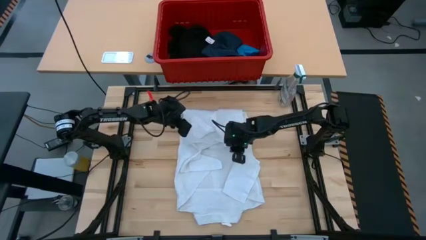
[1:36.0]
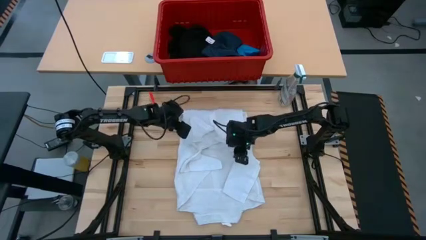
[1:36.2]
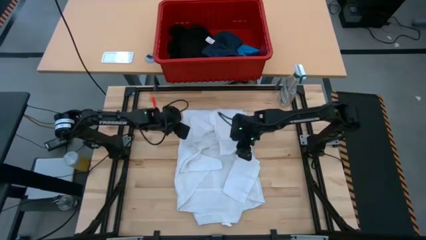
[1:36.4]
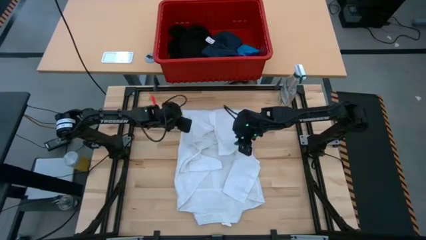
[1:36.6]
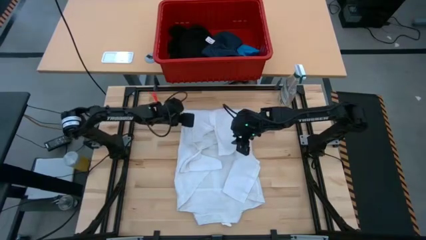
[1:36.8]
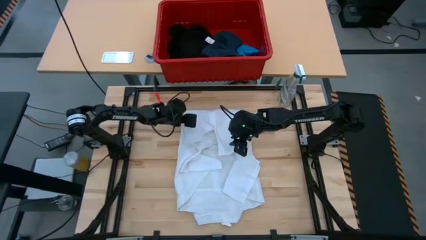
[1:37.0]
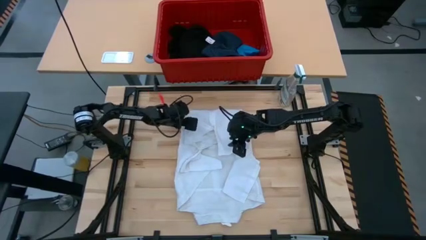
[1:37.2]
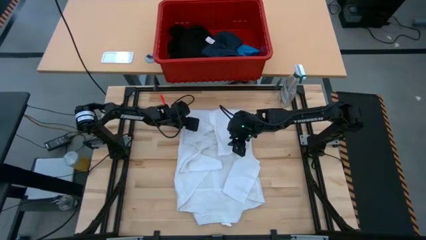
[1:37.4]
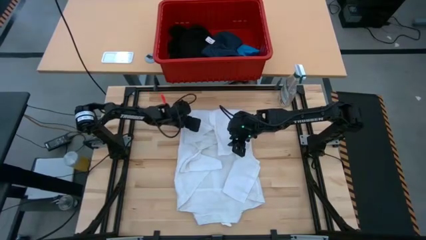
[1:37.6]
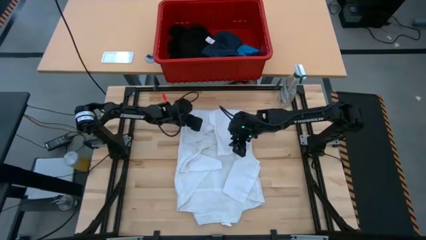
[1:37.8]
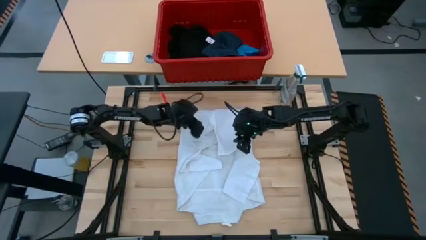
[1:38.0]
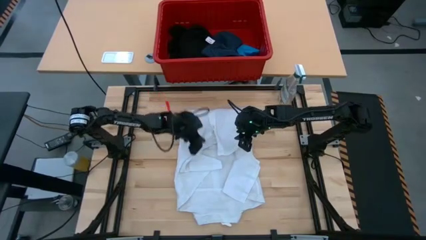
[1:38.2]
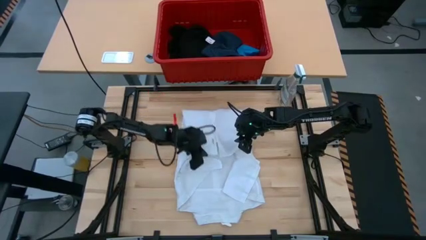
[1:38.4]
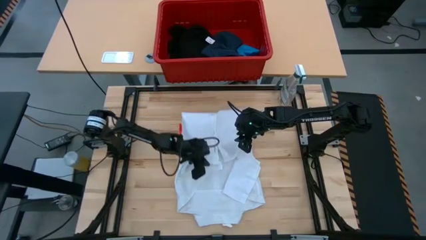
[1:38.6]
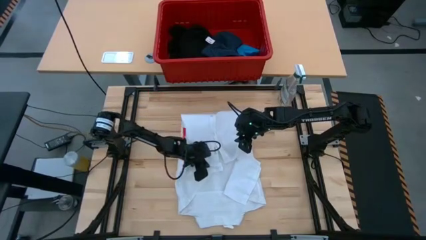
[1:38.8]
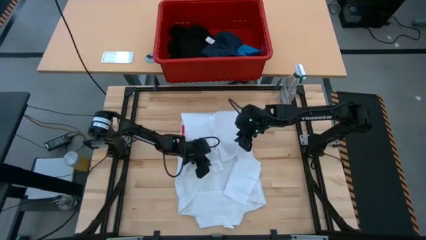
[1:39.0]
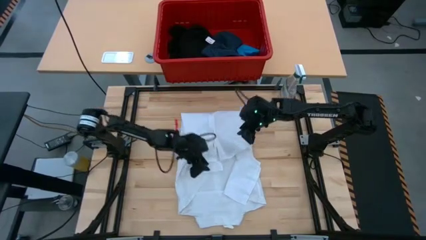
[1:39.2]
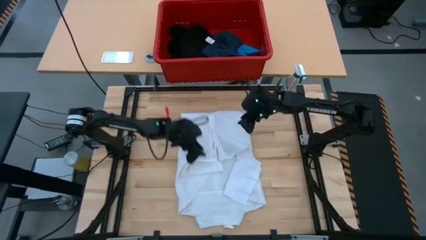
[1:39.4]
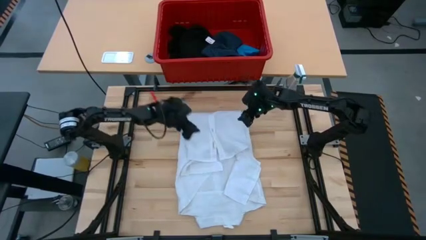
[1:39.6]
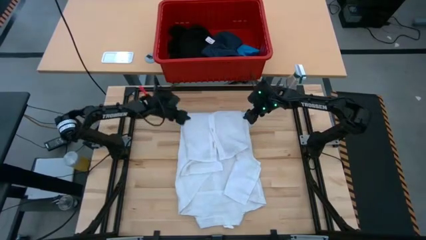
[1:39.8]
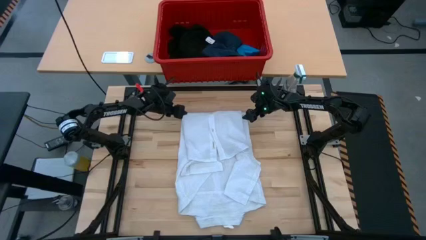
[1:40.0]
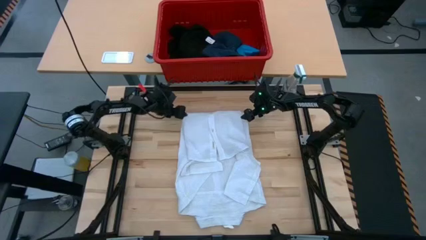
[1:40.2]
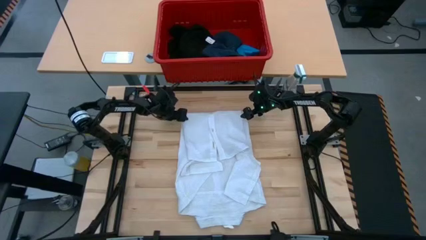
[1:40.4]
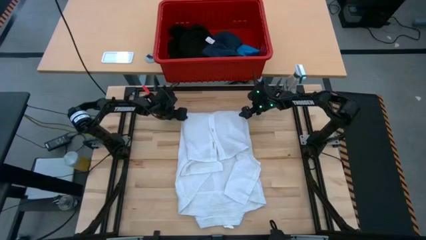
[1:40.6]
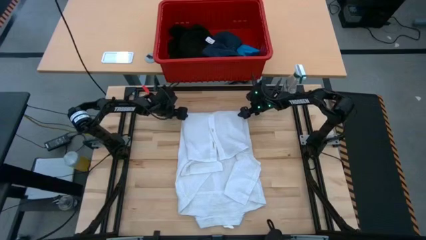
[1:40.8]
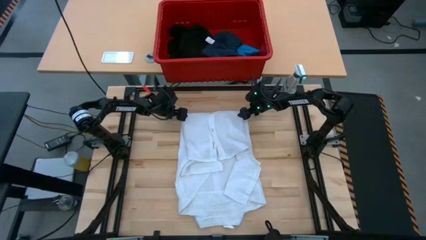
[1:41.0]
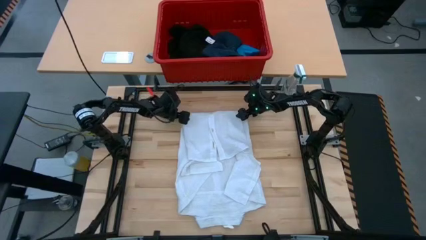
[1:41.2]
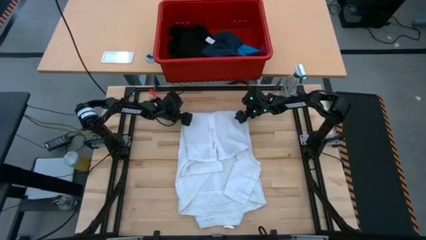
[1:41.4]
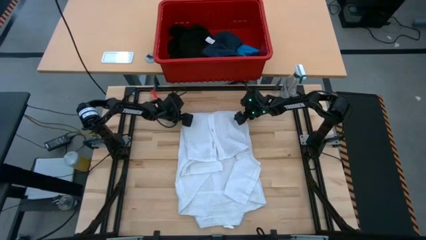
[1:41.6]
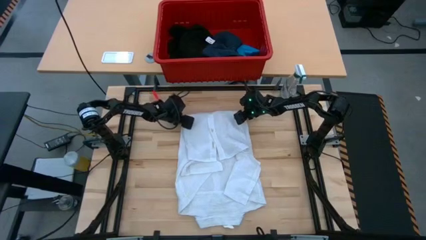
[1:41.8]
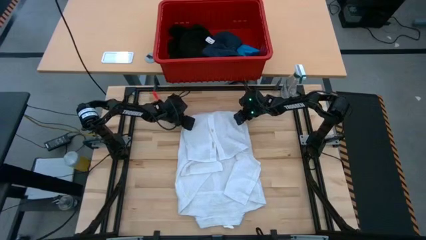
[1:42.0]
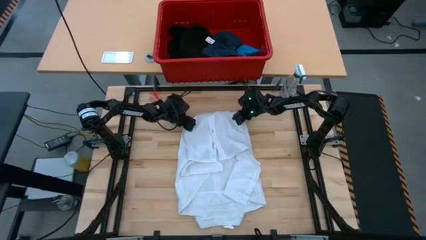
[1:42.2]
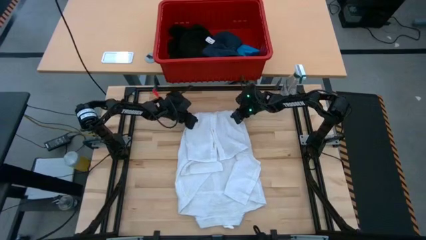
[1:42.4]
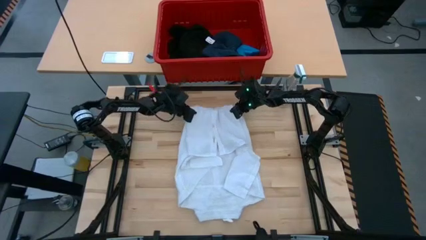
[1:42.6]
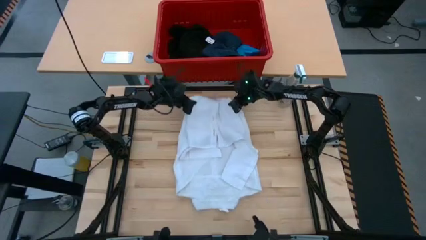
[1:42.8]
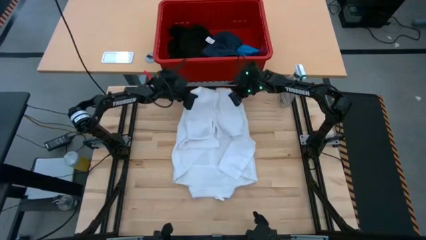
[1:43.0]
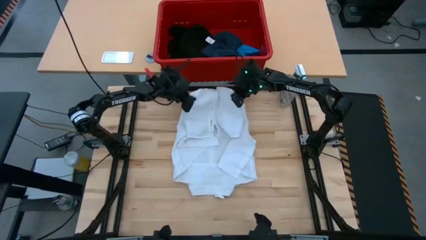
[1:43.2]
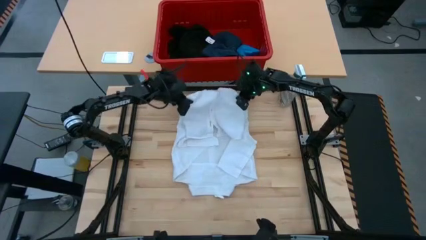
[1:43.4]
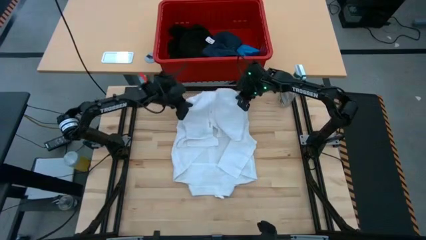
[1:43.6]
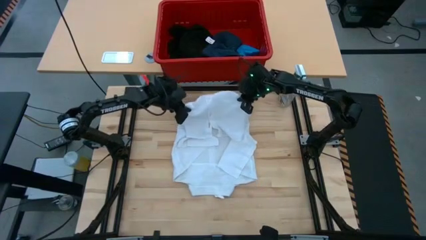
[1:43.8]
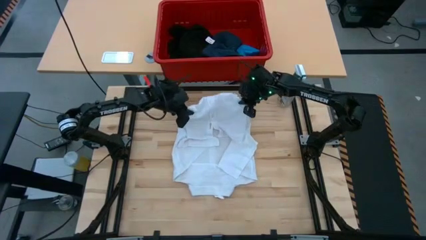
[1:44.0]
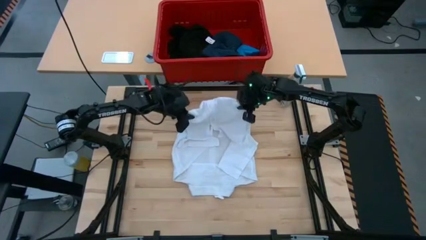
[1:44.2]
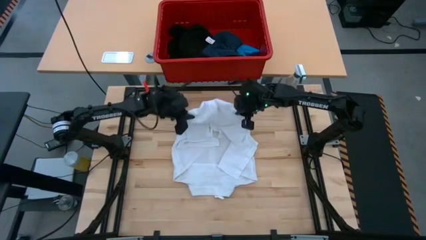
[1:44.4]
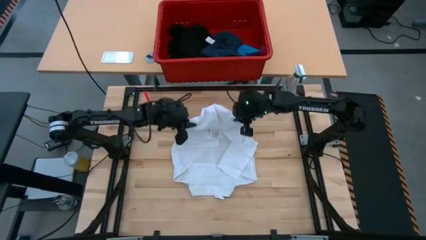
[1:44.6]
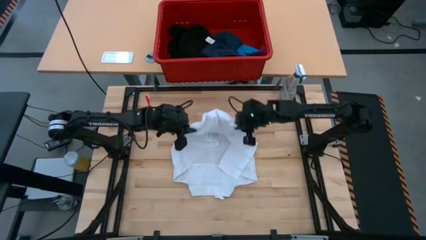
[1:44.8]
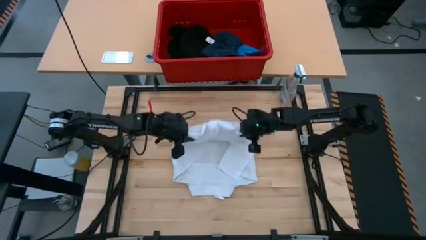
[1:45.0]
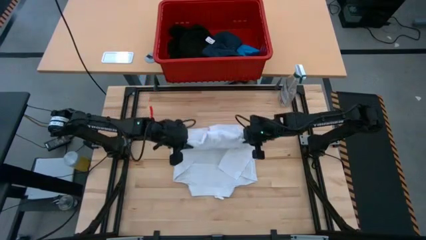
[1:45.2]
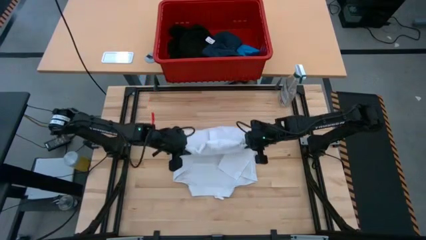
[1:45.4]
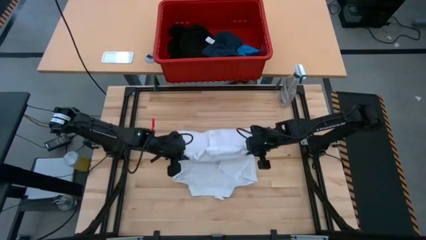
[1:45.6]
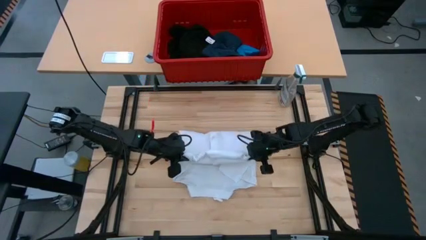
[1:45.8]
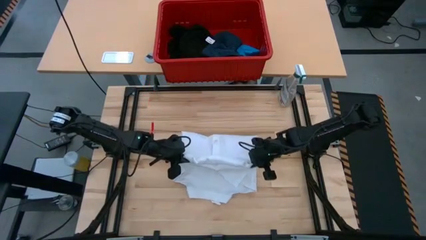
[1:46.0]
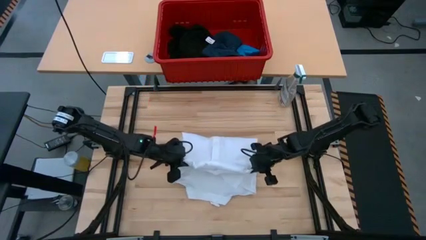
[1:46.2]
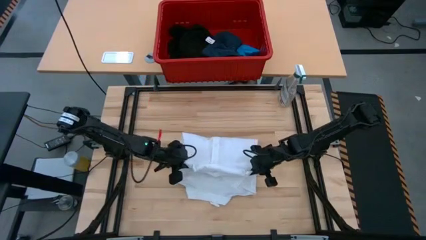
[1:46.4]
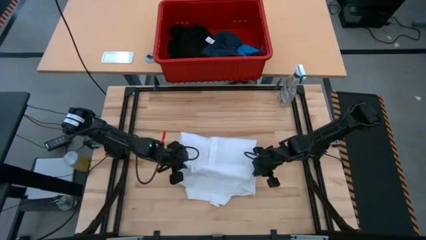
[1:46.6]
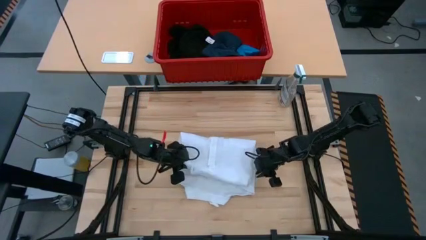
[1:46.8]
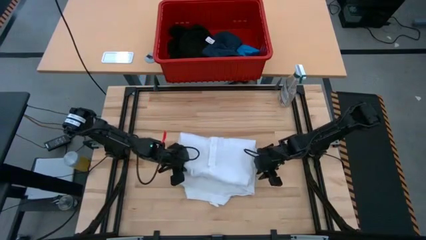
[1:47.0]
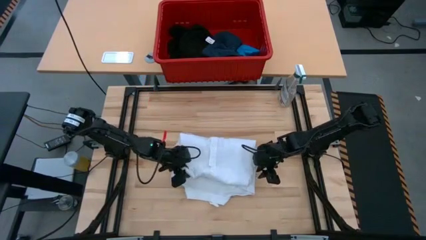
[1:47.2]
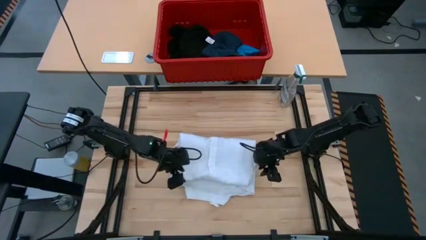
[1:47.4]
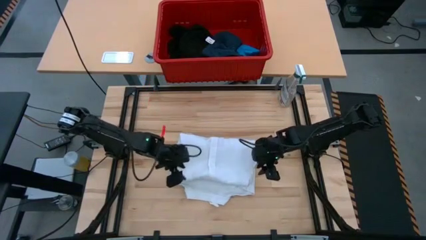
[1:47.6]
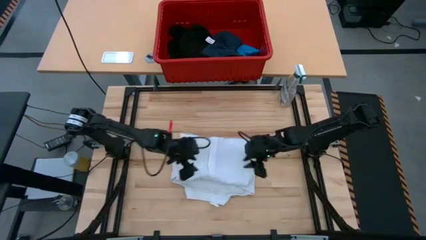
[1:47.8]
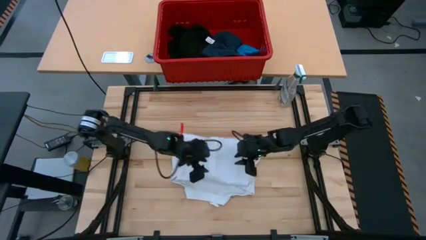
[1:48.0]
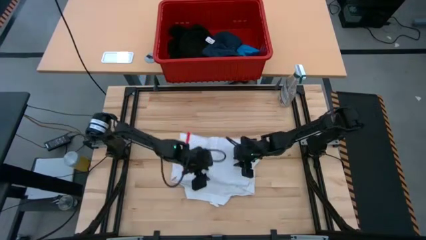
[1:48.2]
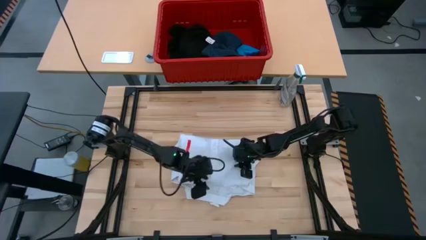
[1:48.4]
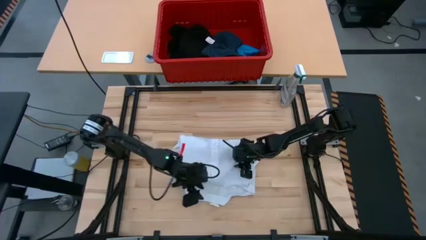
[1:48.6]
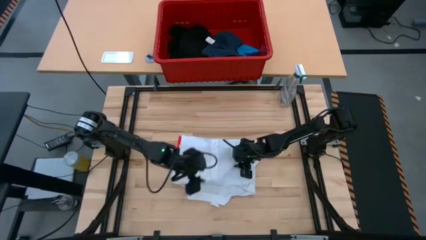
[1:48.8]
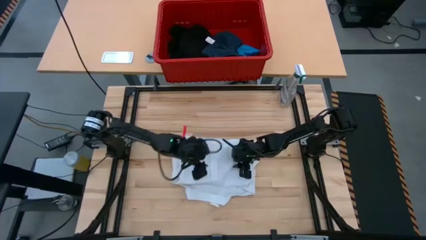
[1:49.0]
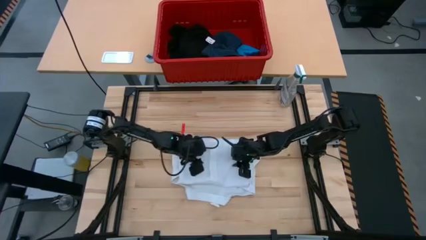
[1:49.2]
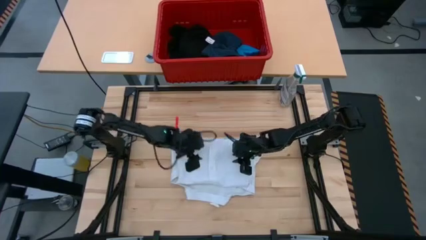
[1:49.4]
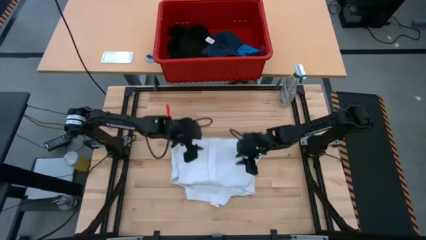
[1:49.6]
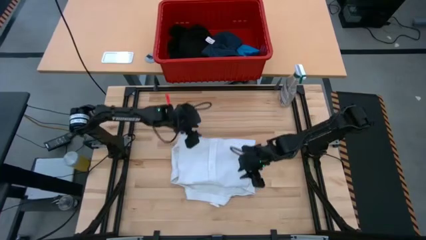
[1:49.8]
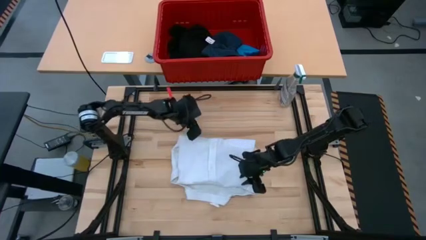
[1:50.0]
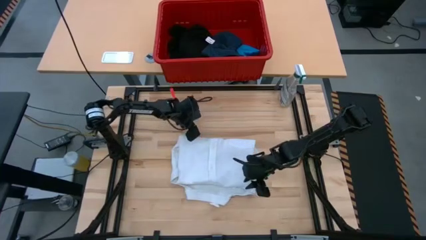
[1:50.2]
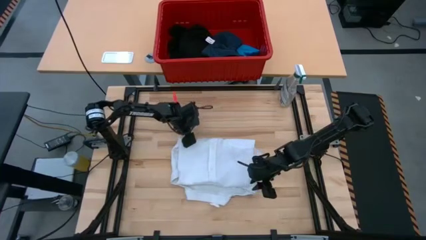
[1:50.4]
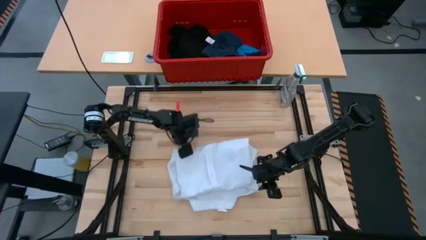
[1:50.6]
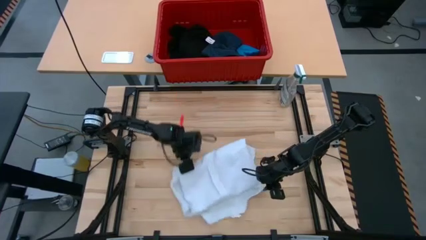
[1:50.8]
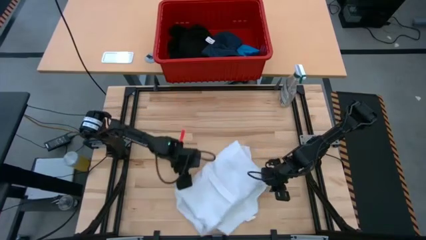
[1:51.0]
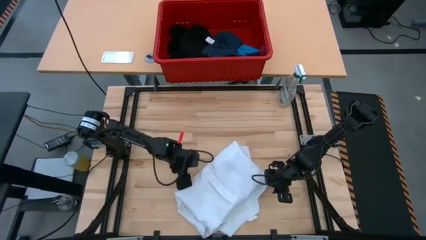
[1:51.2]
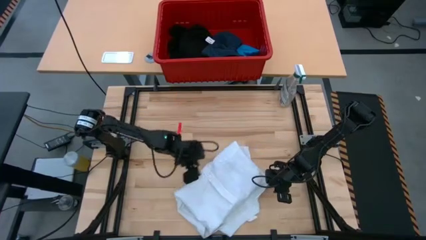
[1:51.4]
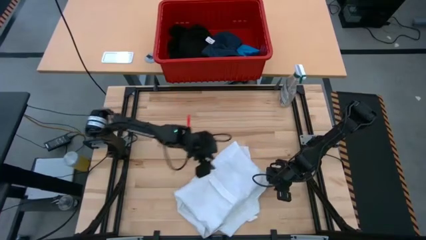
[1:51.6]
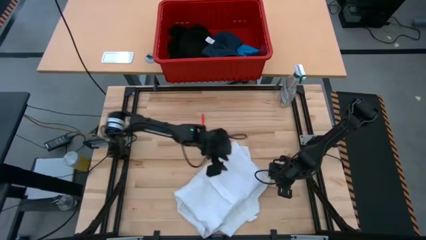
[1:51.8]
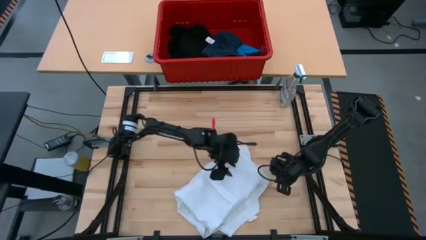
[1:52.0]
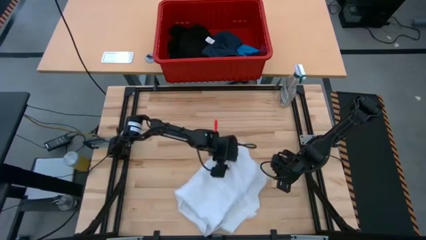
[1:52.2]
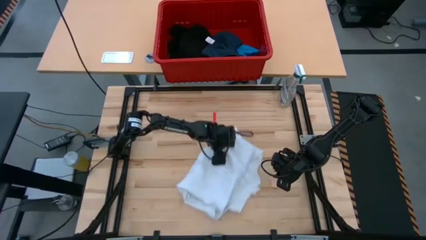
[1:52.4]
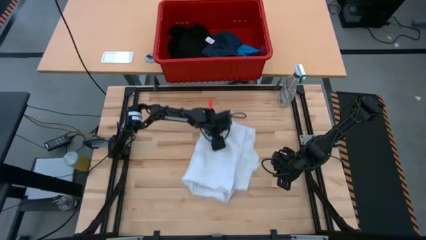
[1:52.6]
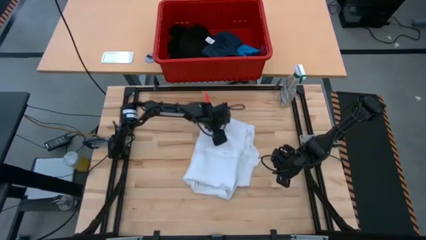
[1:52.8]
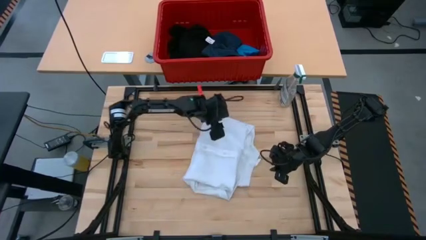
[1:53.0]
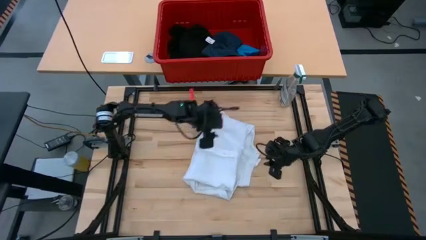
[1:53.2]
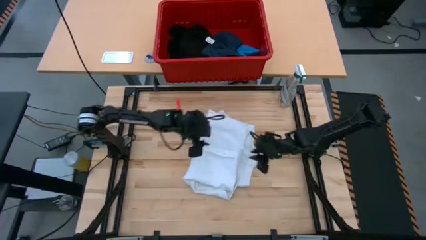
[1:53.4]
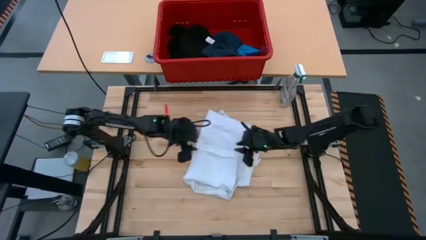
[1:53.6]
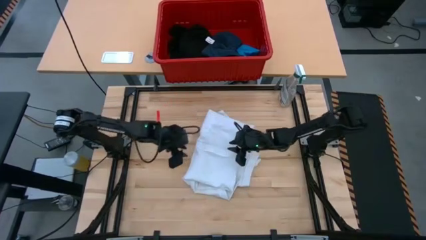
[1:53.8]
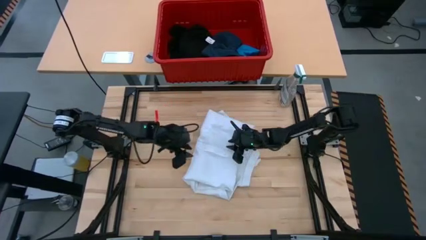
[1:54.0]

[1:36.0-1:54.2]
Task: Fold Laundry from Bin
Fold the white polo shirt
